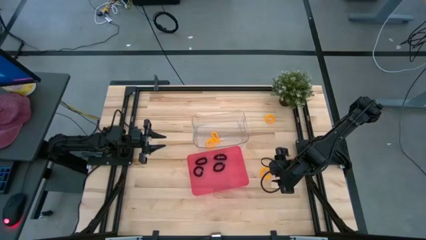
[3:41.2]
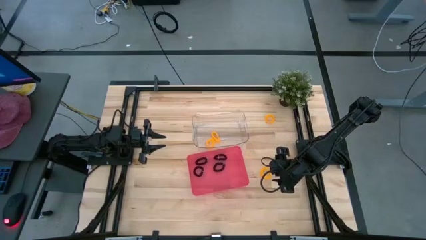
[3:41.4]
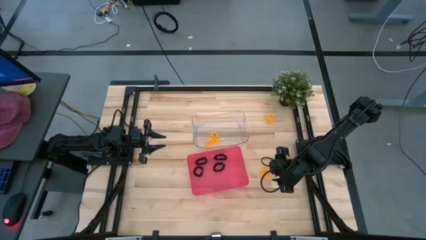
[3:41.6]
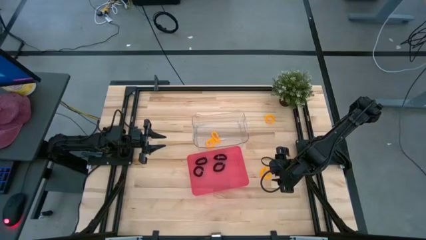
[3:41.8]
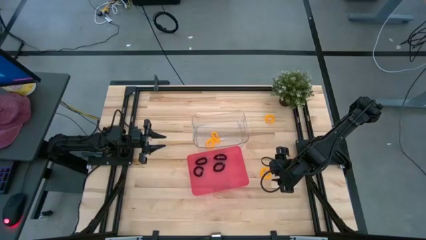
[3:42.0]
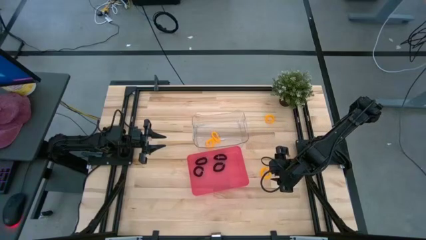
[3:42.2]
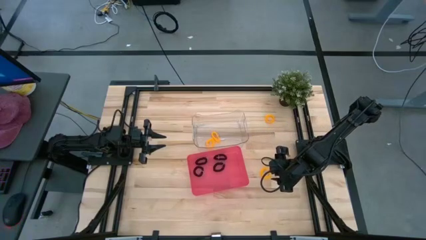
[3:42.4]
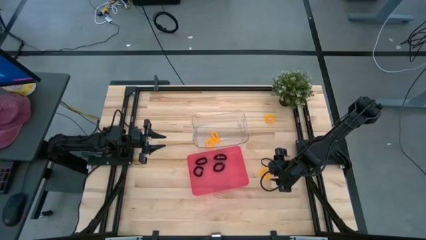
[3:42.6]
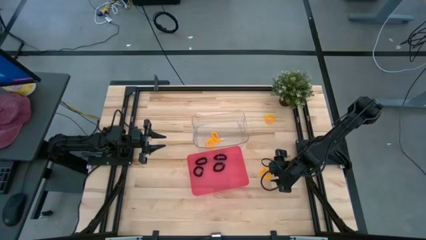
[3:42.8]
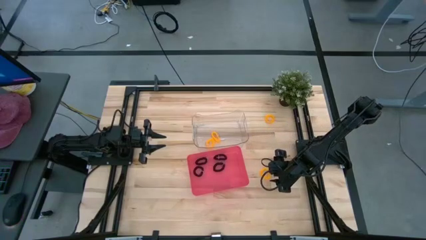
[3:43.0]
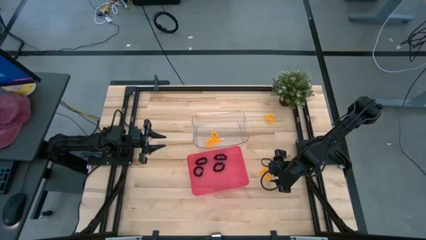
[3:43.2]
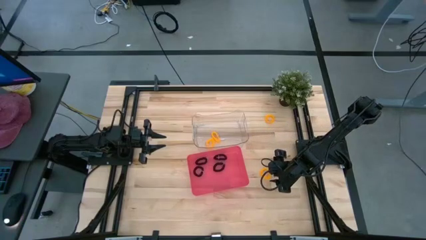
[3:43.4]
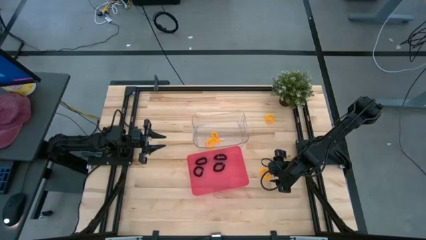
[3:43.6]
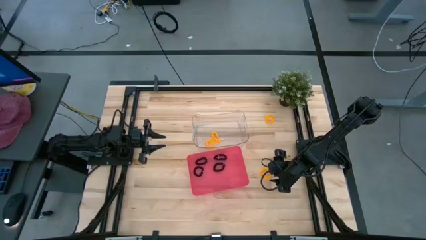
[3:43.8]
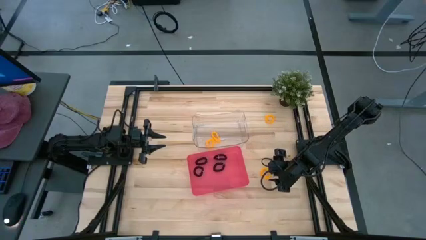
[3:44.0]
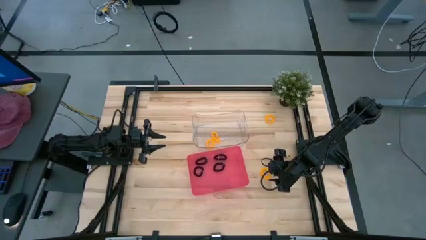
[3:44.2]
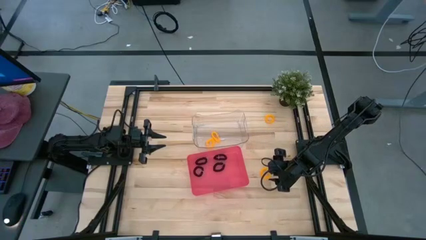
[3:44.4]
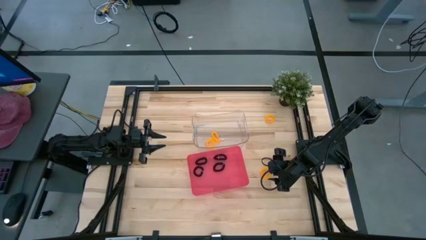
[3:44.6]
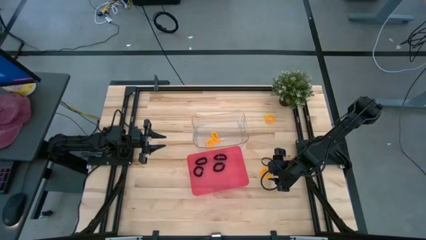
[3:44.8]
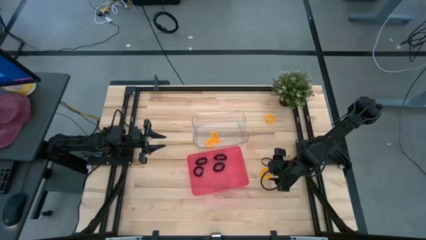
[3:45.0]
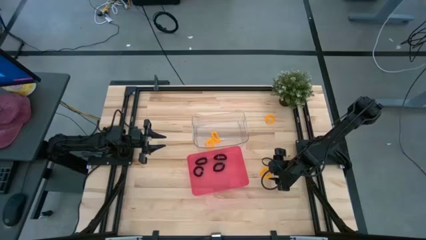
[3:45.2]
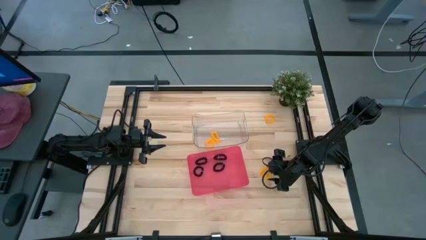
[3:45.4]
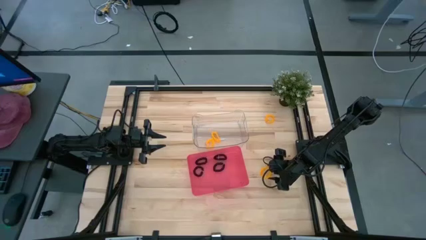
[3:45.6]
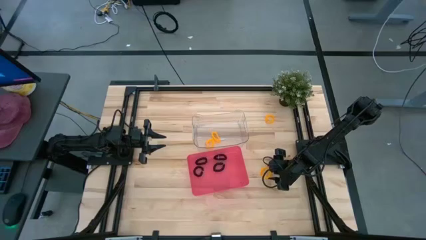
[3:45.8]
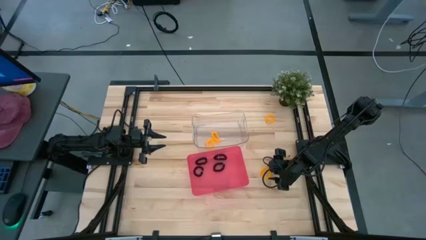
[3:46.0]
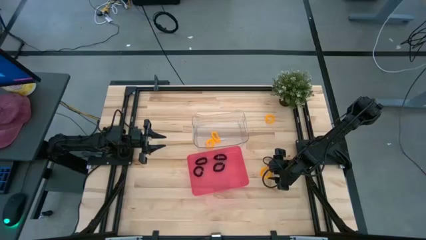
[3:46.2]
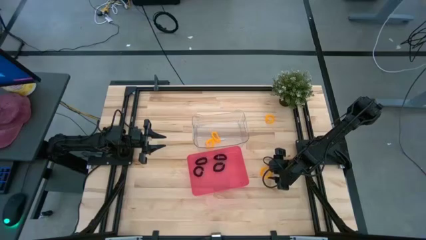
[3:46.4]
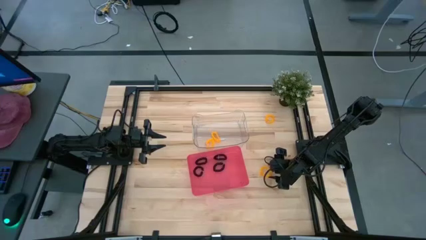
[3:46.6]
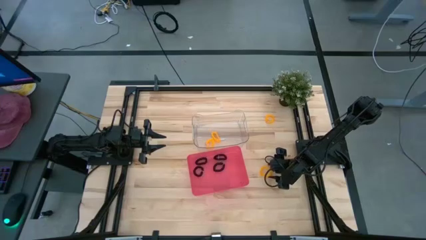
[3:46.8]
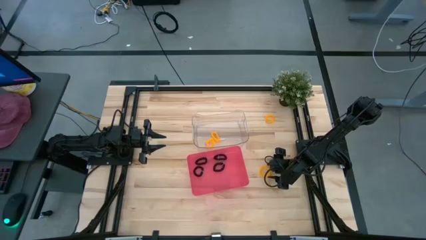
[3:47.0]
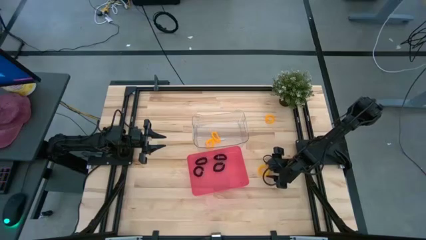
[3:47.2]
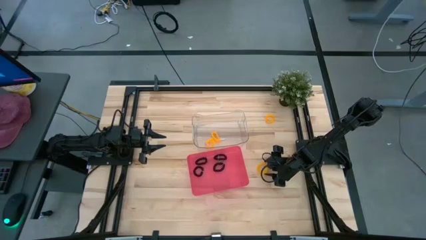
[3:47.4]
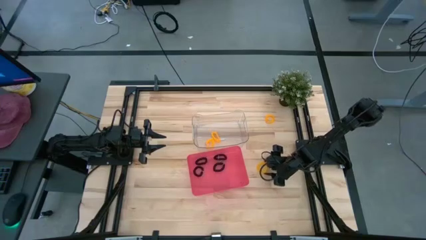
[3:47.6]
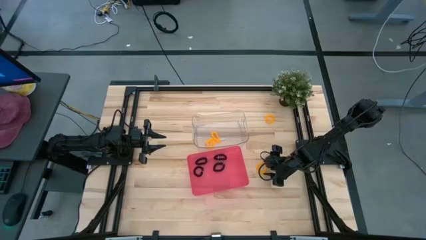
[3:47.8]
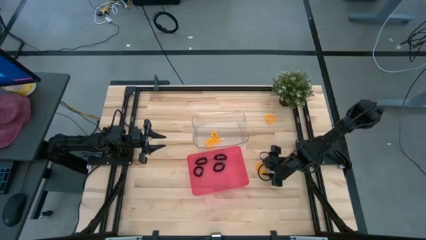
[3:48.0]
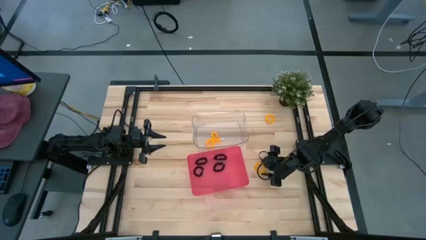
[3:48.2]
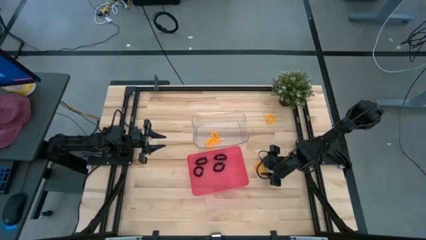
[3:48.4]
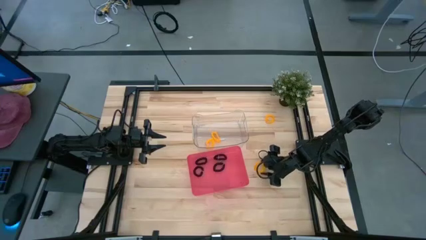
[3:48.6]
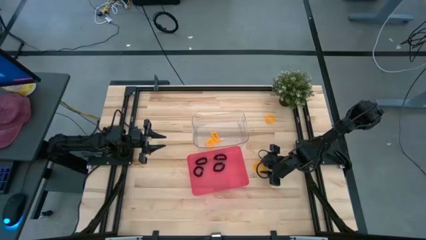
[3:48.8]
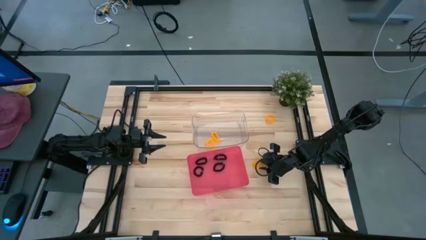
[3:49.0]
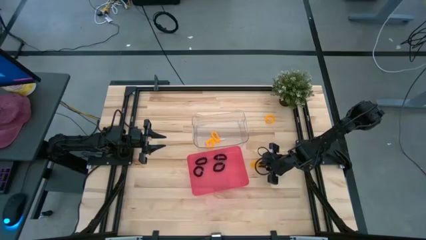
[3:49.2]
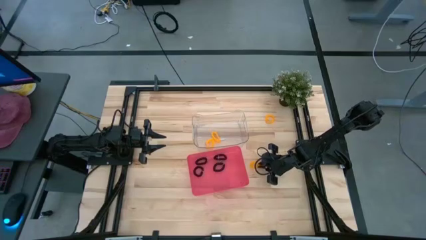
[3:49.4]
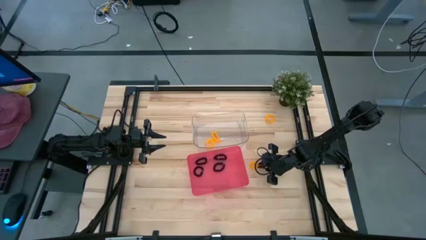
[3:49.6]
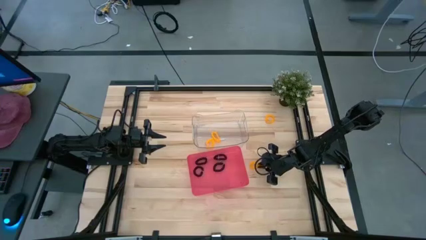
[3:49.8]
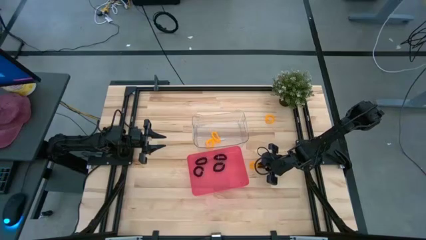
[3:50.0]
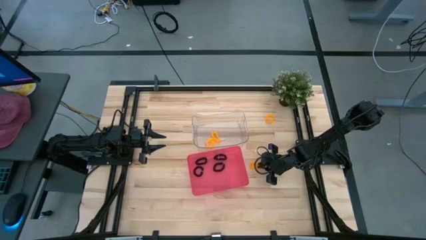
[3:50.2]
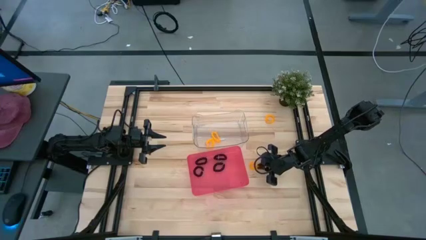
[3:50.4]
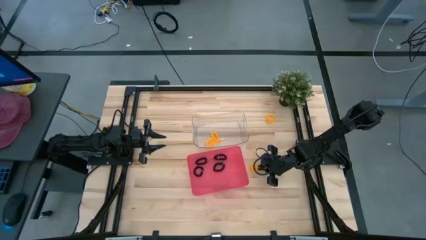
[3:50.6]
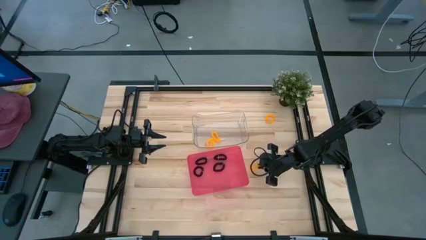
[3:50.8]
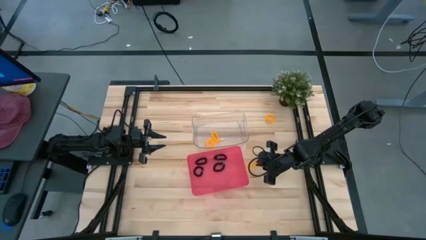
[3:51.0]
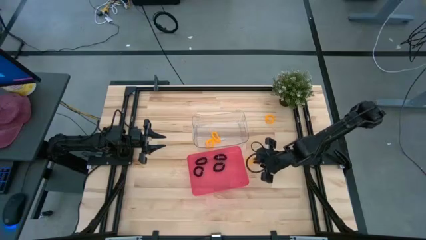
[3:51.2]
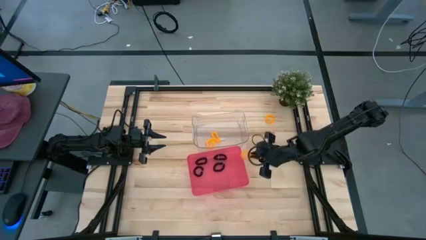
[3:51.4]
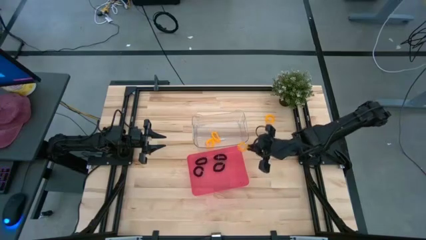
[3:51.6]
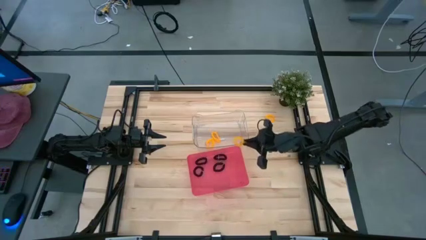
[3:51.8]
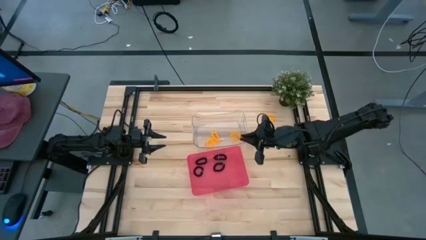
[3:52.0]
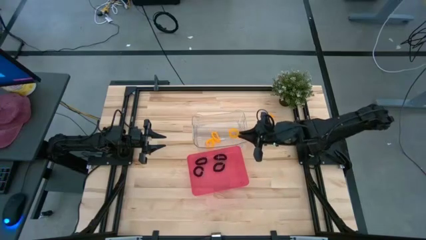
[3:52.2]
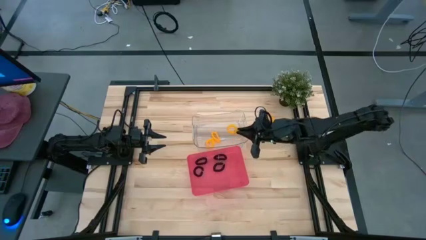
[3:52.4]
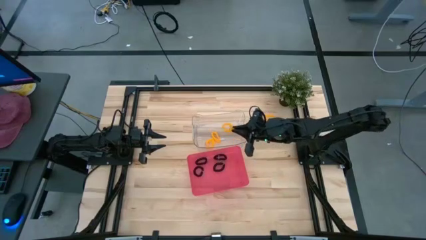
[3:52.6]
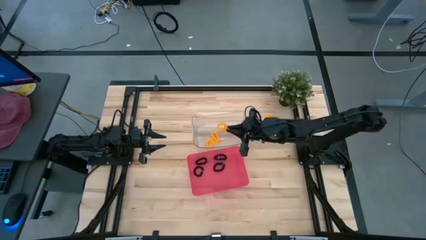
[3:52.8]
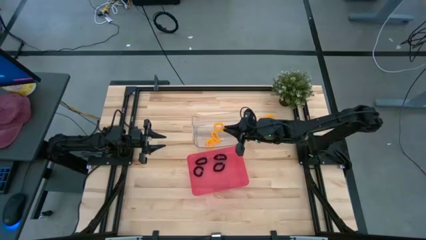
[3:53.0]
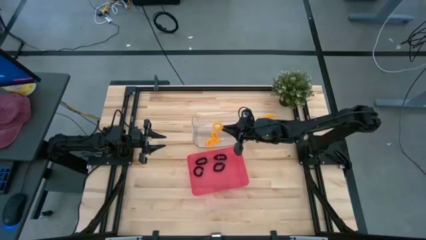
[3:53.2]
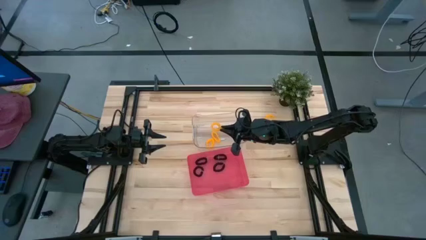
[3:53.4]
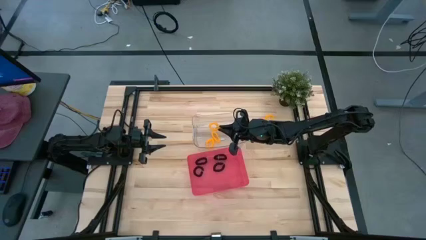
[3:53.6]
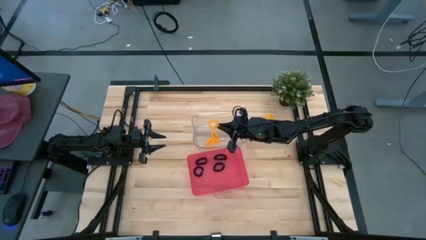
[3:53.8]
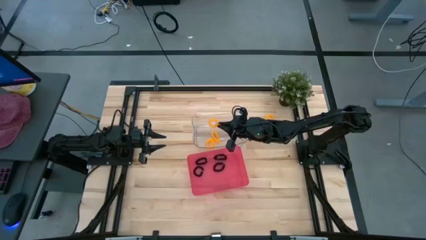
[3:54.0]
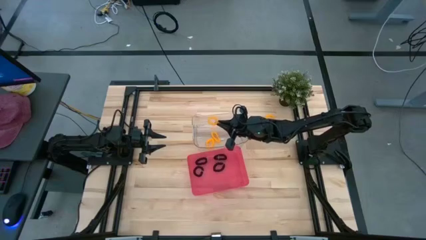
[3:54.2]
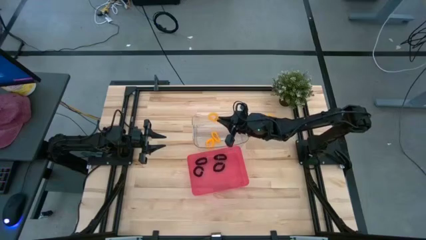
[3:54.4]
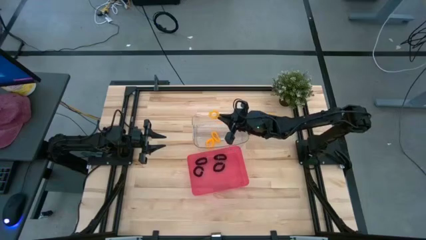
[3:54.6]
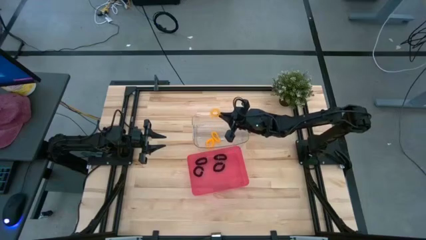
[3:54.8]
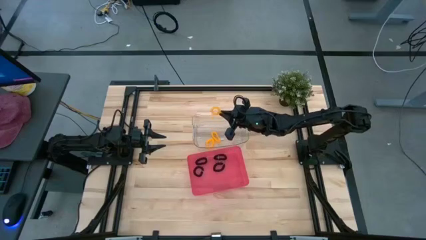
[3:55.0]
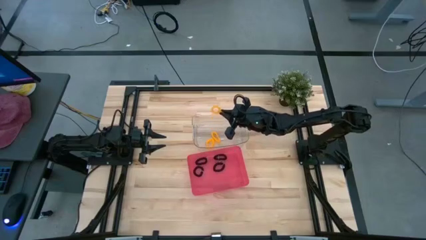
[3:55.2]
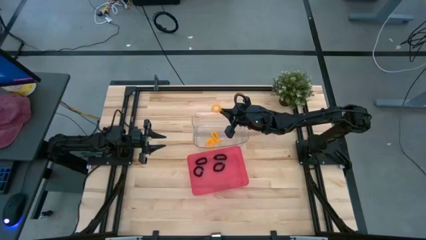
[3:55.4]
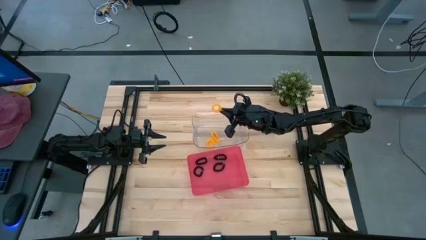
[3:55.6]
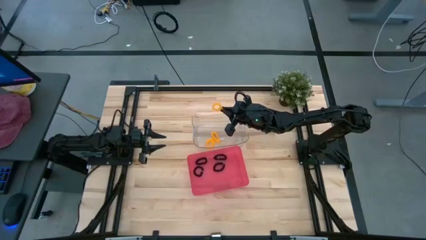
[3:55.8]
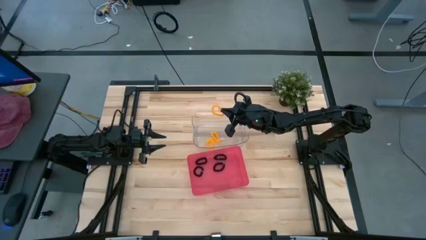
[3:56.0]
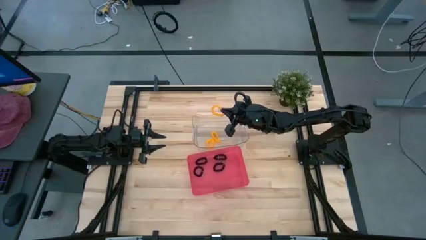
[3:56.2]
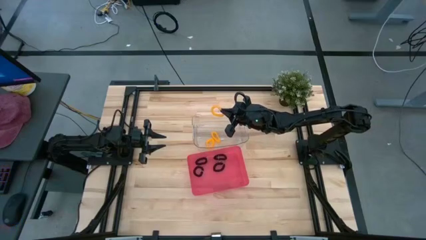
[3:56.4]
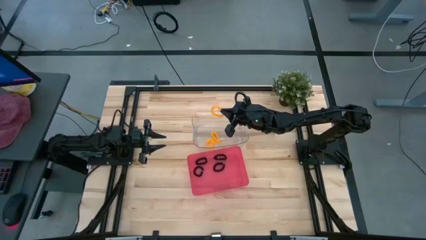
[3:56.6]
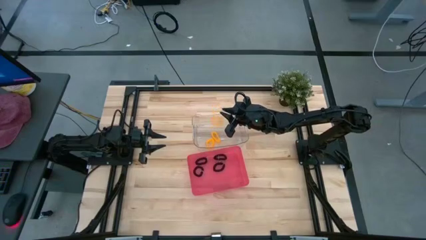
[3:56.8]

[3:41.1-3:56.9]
Task: Sort spring keychains
Put the top yellow spring keychain into the transparent bin
